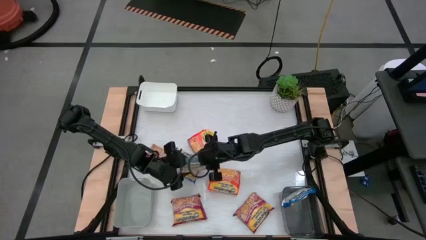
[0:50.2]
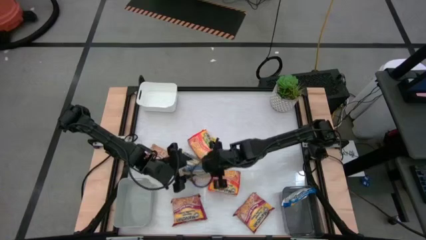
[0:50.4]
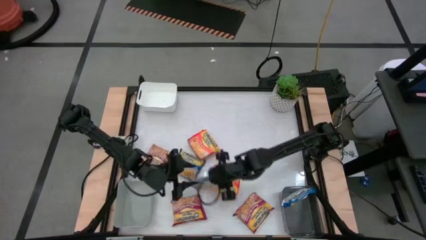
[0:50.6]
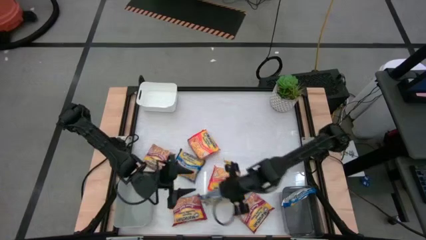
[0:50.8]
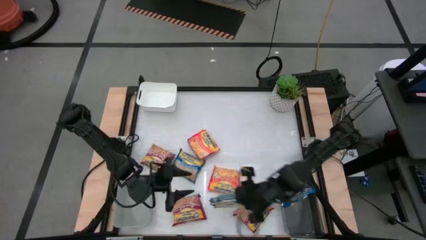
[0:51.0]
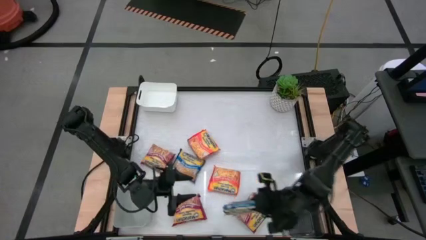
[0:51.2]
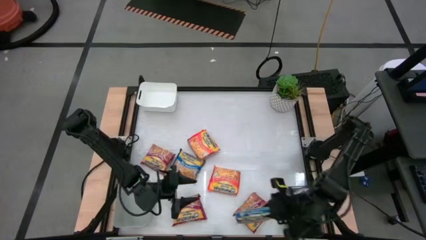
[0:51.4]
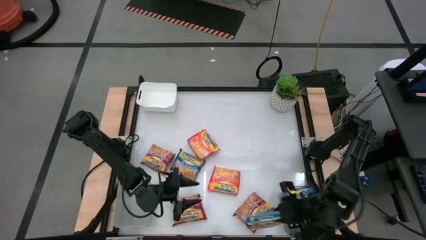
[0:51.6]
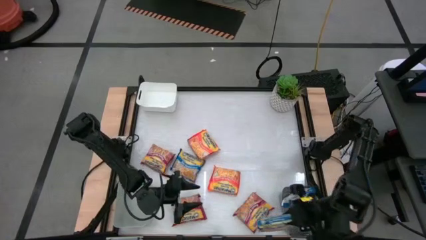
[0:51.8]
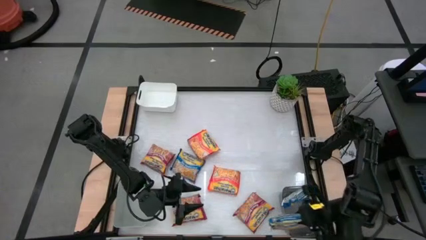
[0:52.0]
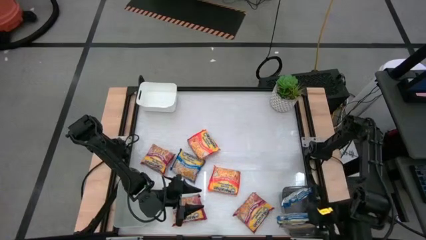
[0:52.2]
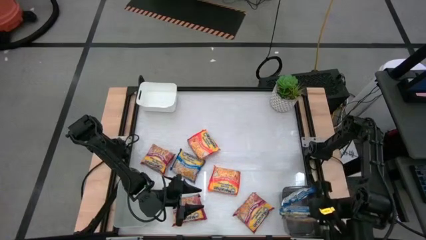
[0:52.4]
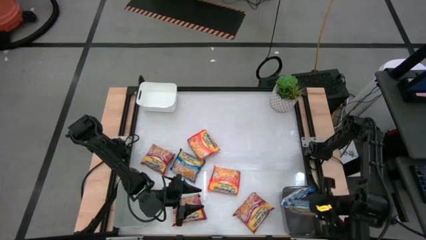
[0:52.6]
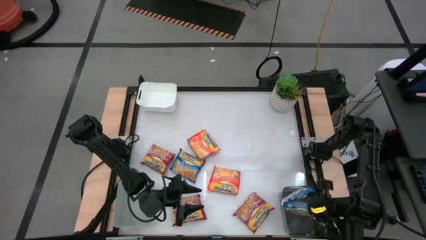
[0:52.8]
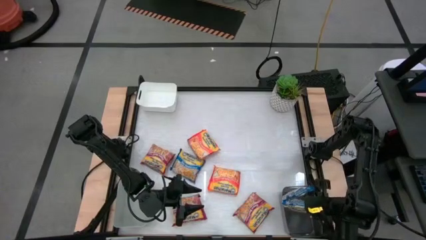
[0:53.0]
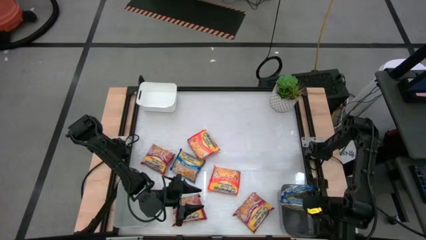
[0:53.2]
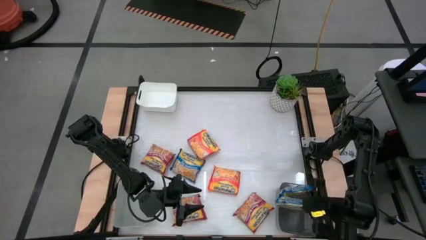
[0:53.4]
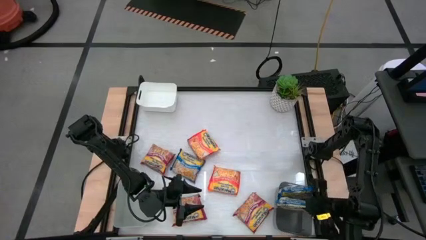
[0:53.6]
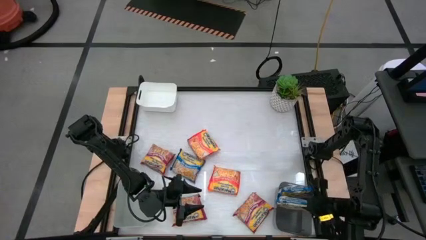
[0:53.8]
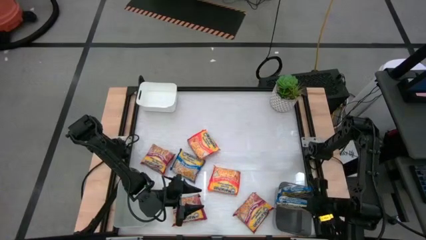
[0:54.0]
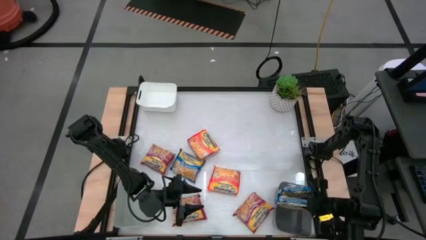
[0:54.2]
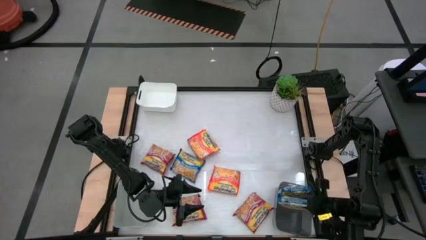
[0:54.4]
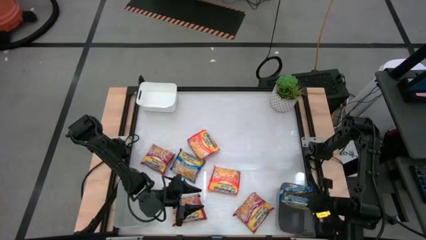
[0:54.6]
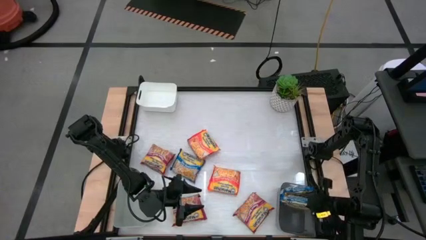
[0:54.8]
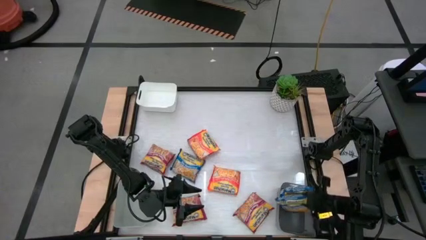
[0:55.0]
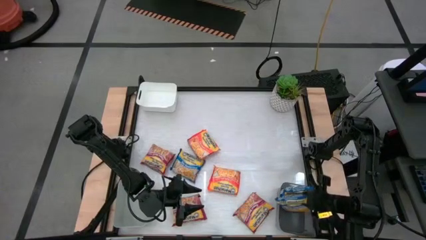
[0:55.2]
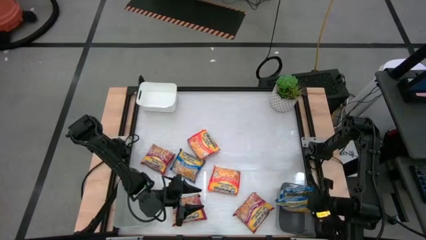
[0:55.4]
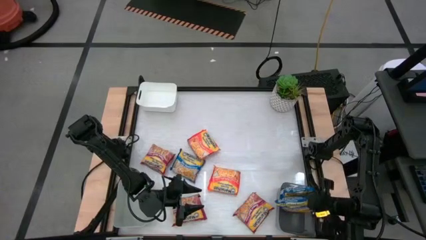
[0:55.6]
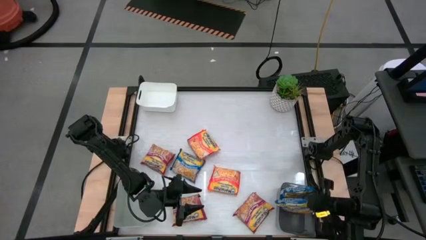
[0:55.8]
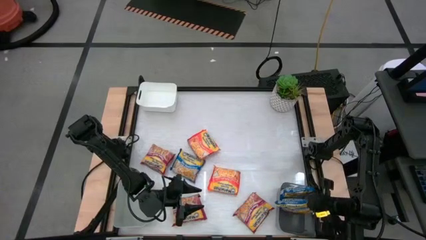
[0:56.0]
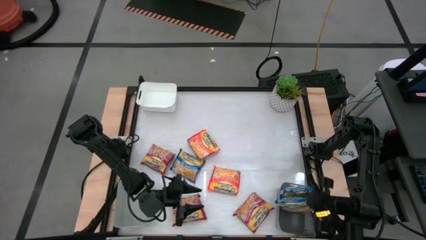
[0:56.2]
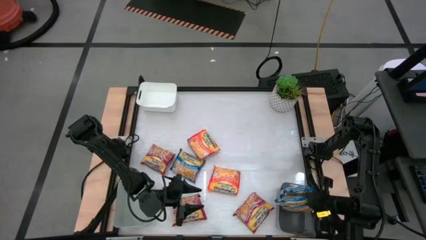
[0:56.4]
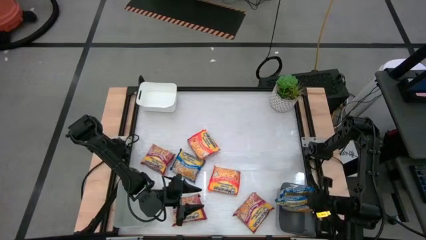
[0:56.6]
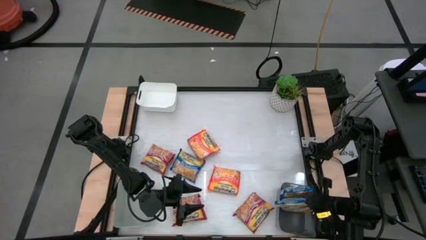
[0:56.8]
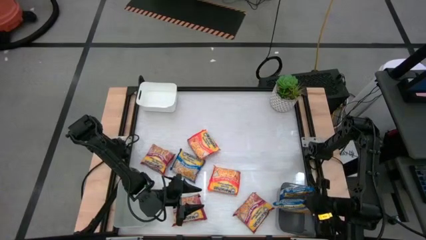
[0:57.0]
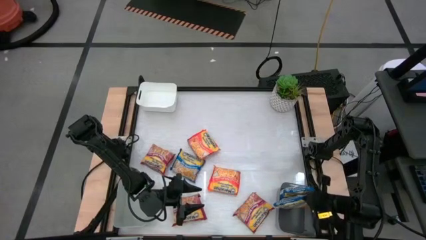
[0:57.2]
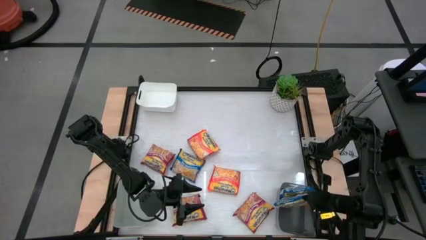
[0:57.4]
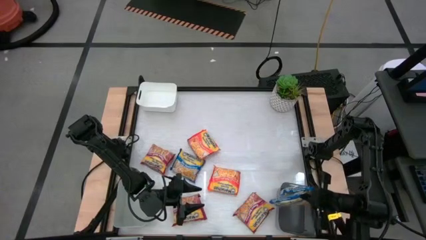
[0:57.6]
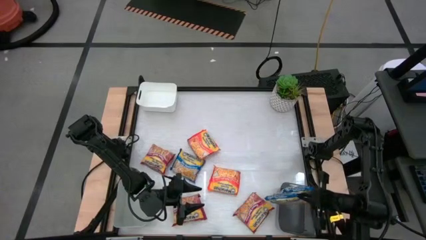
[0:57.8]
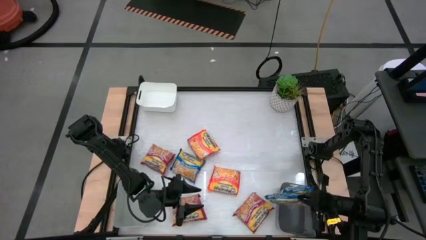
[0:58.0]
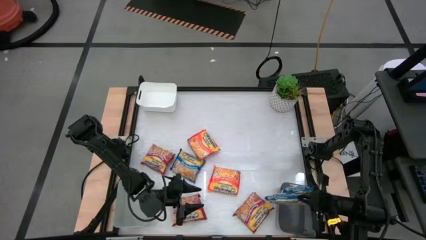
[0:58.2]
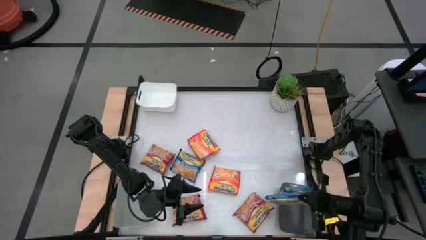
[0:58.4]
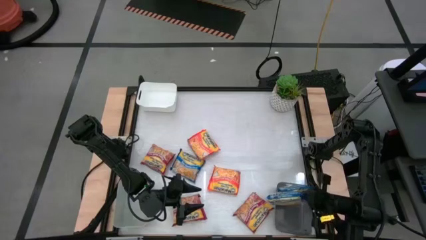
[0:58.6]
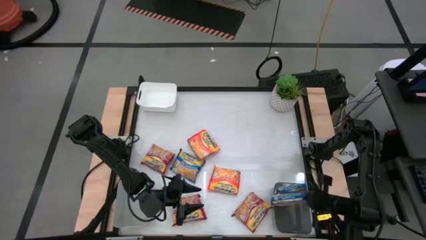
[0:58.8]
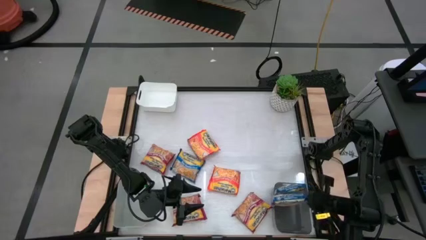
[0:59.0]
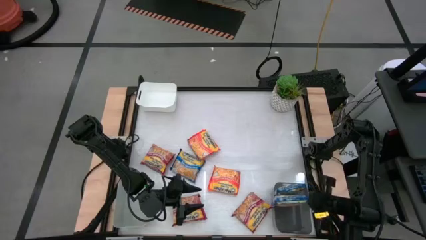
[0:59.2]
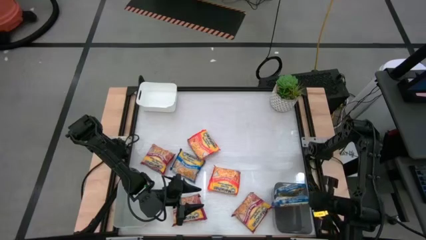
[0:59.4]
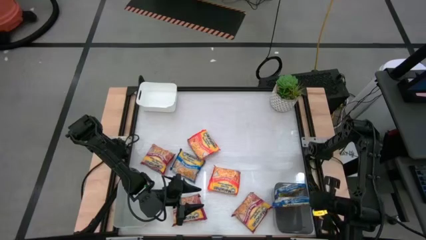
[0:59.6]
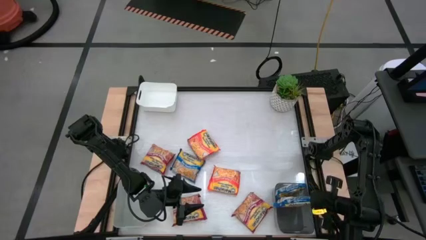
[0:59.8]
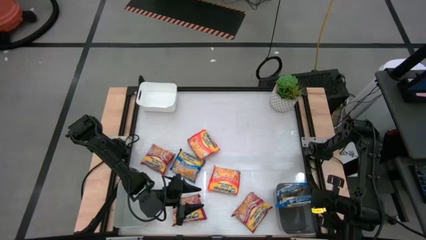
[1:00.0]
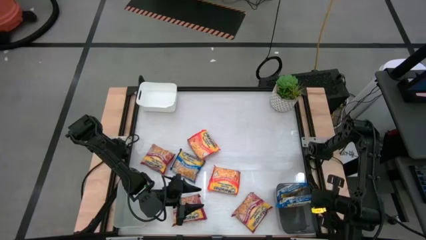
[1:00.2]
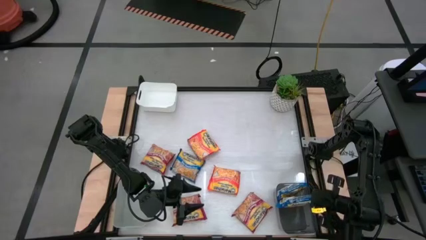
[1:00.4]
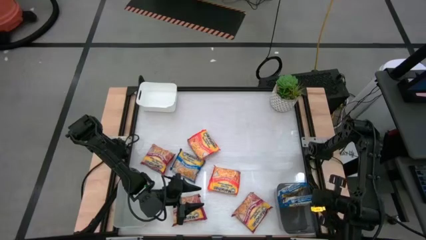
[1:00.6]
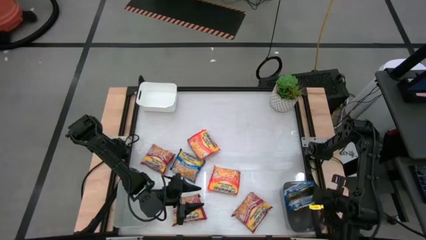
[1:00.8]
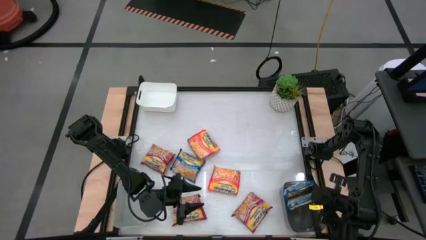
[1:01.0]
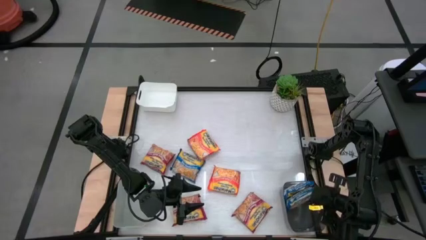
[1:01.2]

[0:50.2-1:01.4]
Task: Sort Maruchan noodles
Put the top blue noodle pack into the black bin

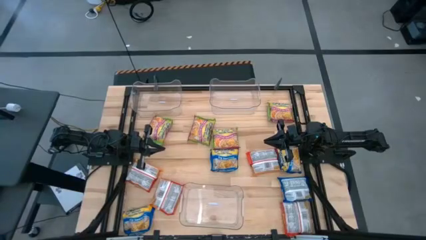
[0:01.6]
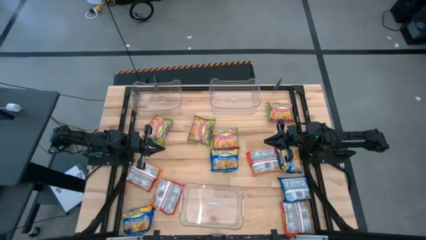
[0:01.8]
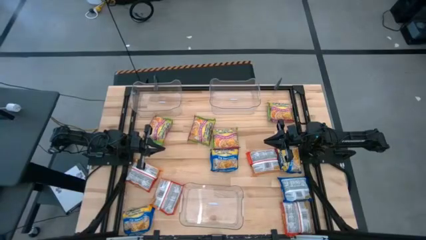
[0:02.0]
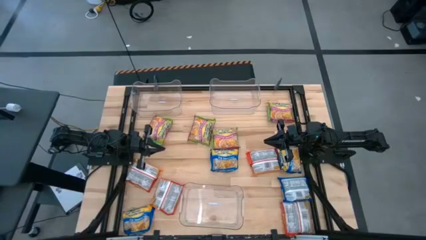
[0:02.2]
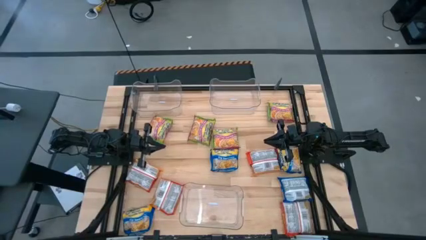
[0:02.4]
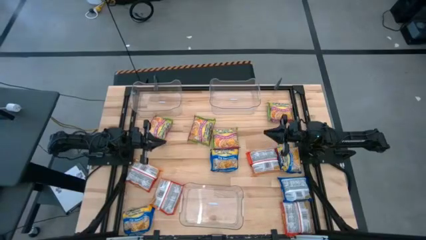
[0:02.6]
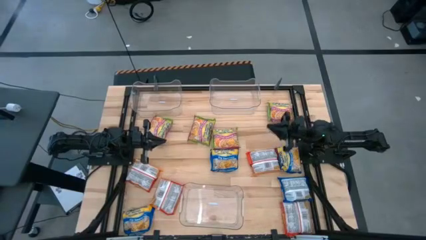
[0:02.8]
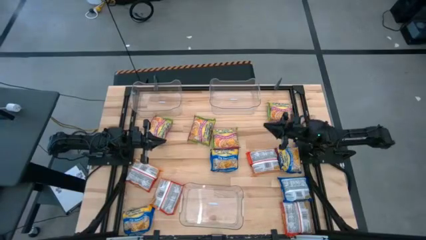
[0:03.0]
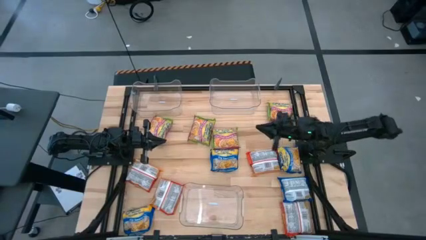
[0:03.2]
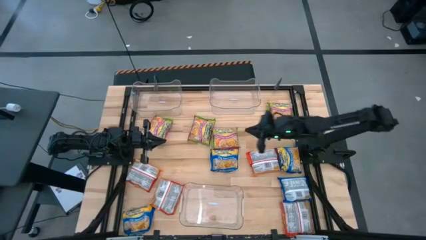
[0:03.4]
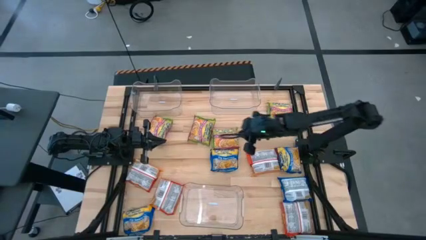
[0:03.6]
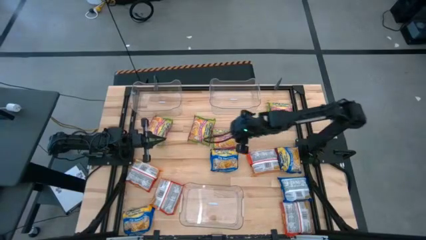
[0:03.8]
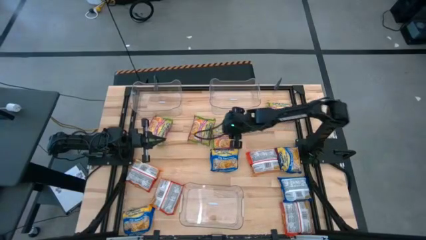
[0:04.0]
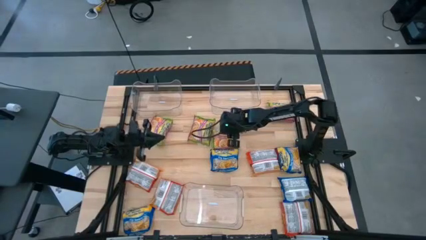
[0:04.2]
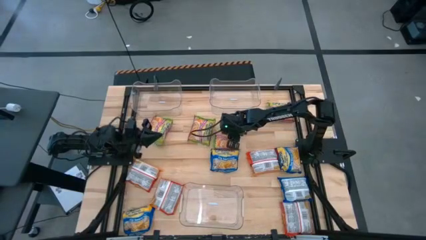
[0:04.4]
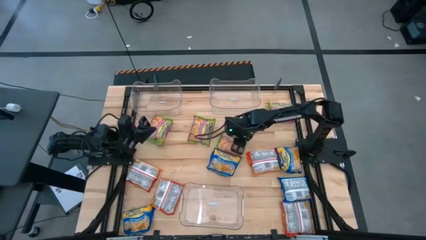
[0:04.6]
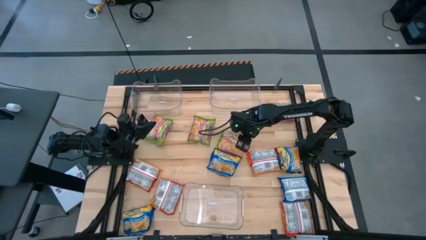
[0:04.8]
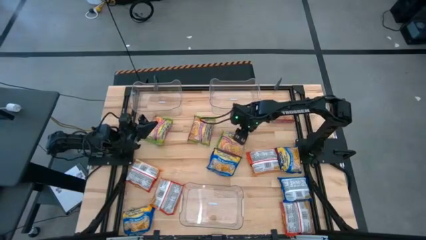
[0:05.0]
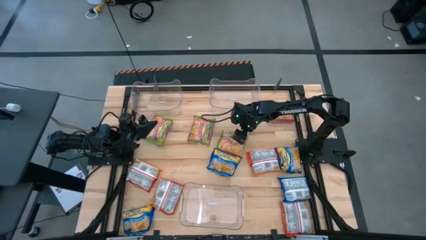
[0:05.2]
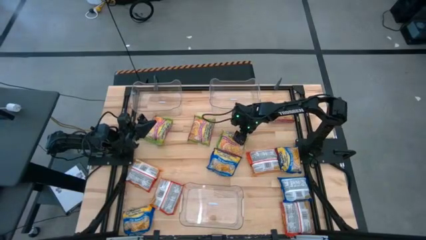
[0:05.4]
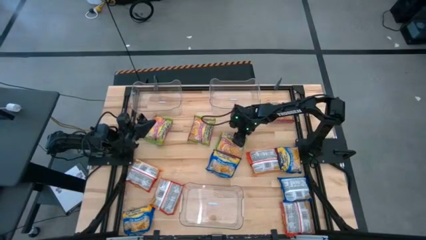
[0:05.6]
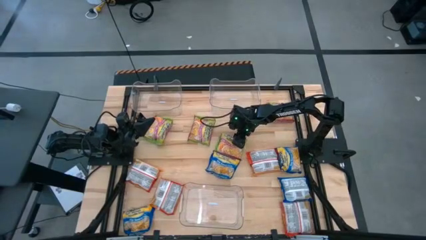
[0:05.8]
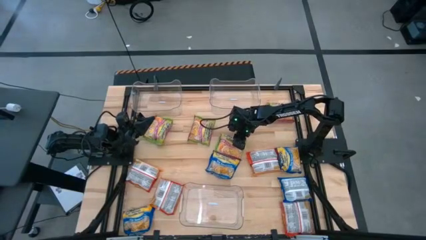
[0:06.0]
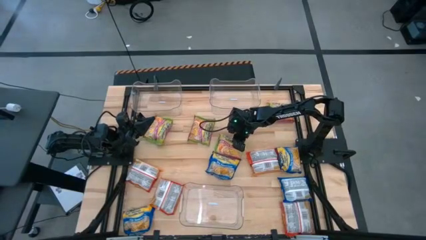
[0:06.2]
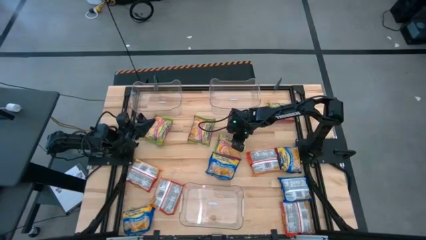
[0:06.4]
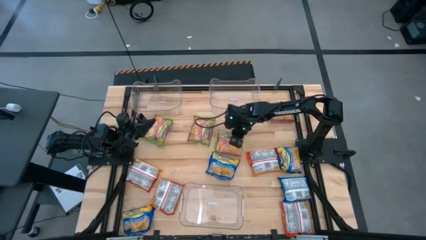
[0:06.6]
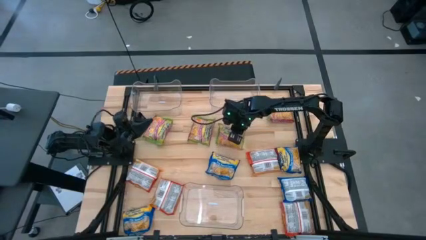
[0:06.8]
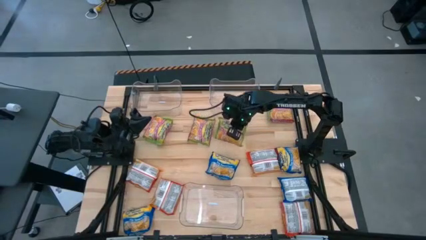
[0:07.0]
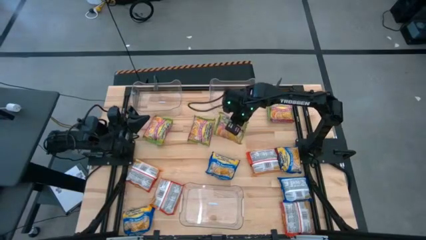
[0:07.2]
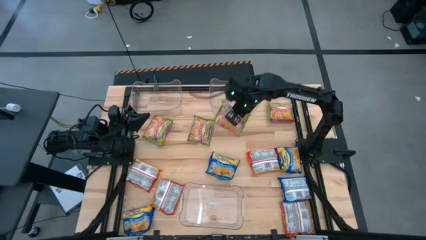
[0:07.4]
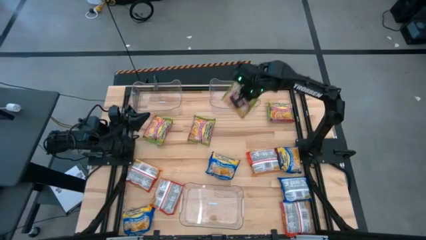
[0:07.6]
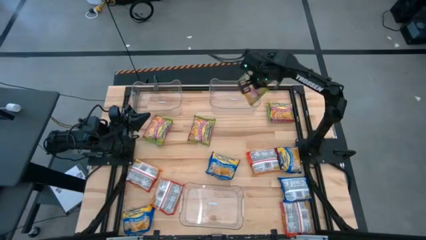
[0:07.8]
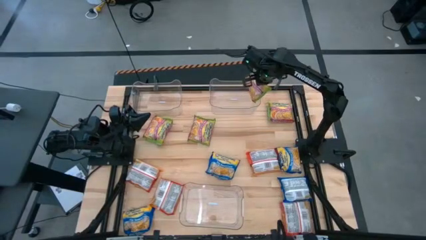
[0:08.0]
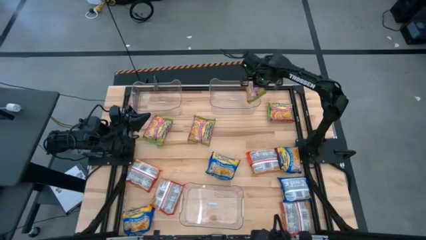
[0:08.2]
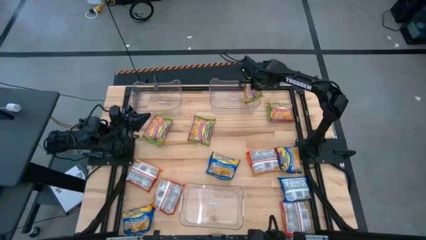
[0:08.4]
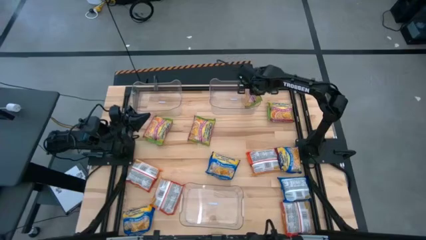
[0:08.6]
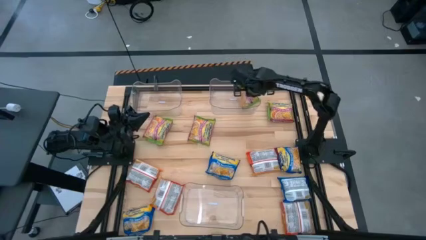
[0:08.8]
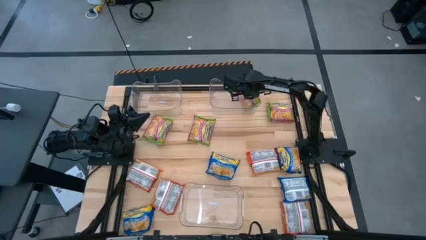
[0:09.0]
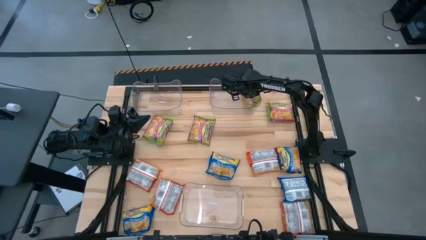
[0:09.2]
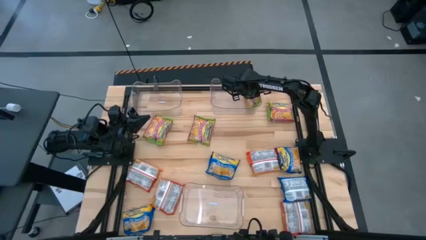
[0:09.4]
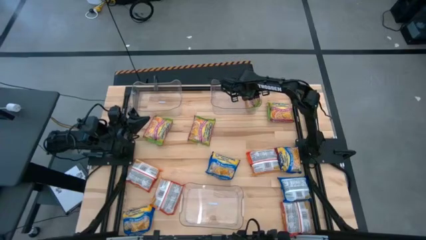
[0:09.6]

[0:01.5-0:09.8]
Task: Sort Maruchan noodles
Put the green noodle pack into the top right transparent bin
